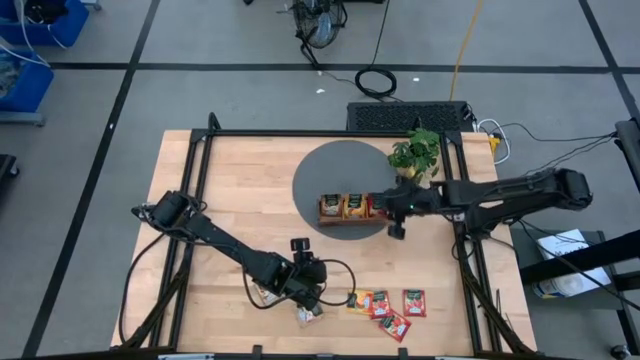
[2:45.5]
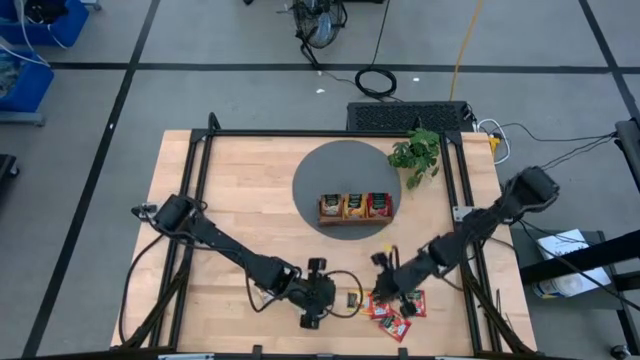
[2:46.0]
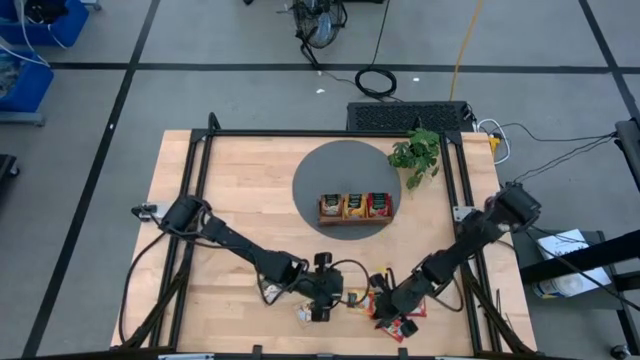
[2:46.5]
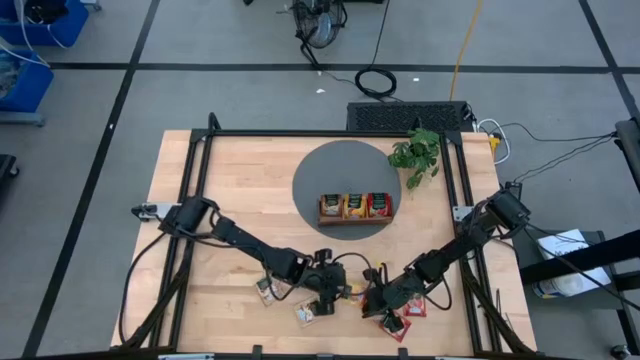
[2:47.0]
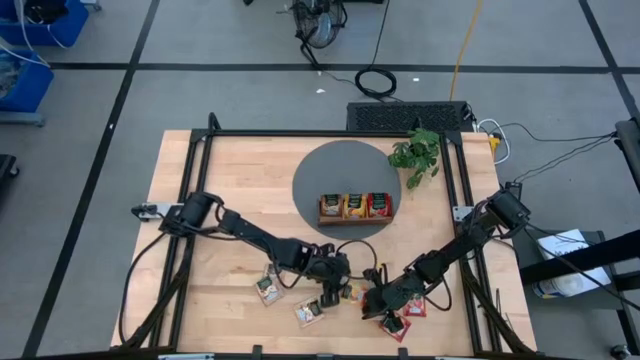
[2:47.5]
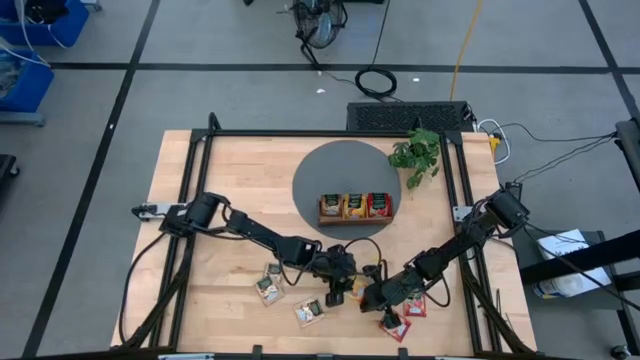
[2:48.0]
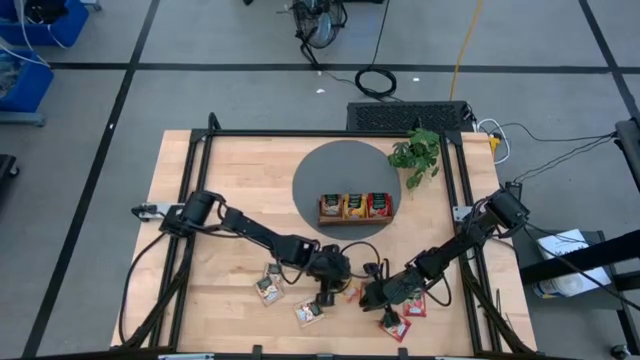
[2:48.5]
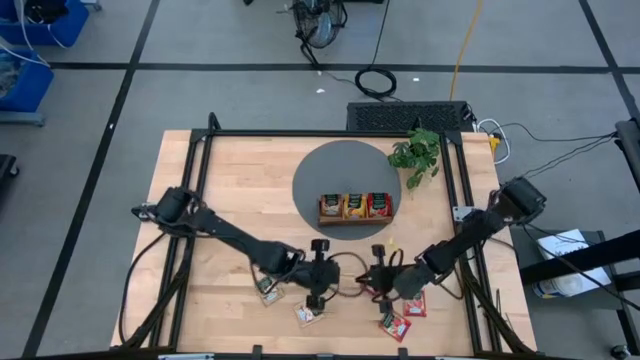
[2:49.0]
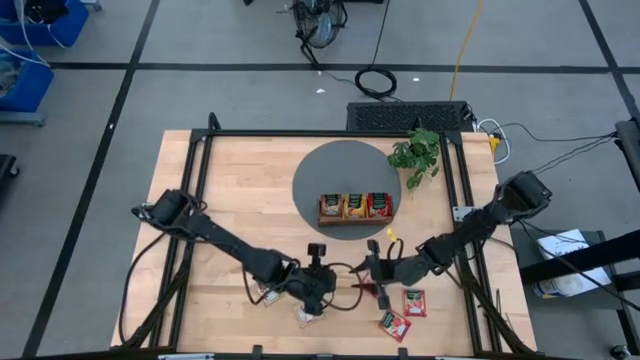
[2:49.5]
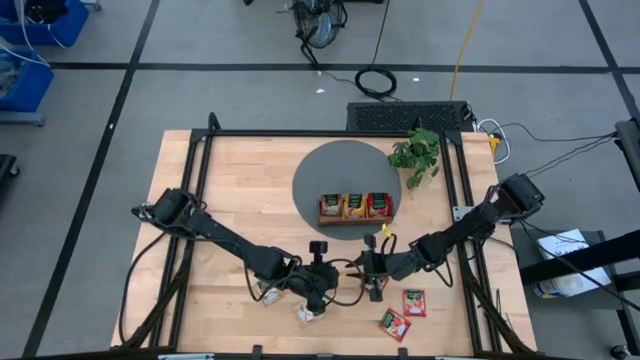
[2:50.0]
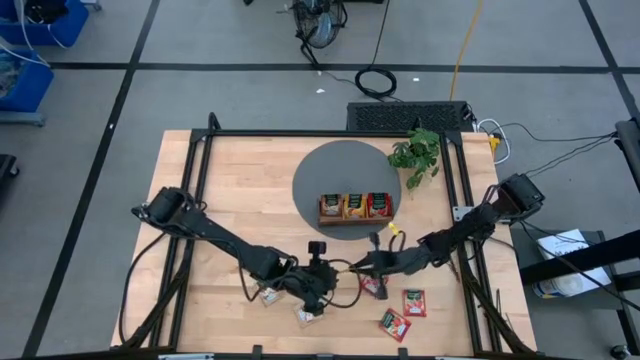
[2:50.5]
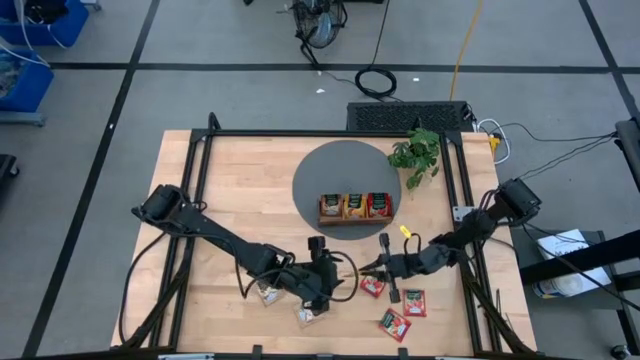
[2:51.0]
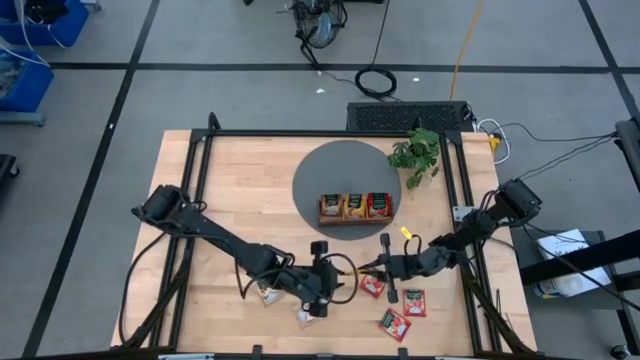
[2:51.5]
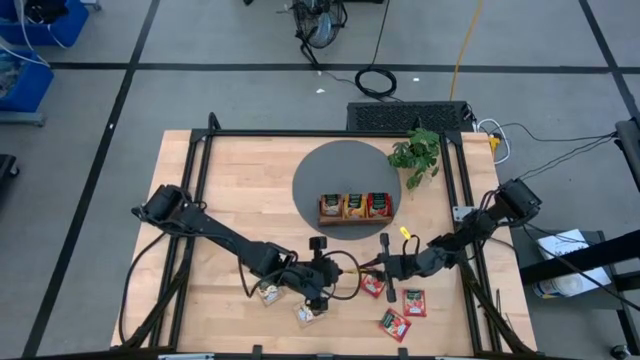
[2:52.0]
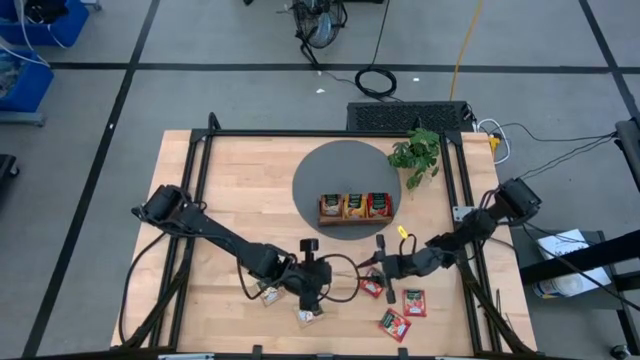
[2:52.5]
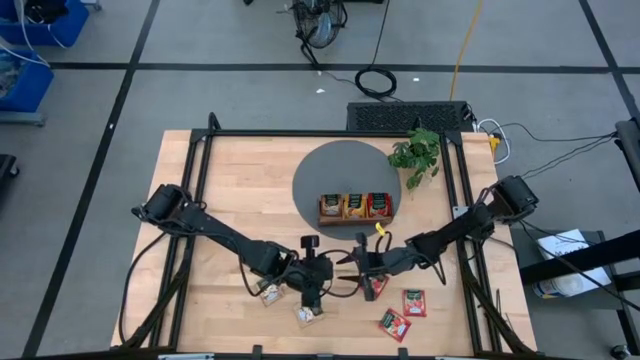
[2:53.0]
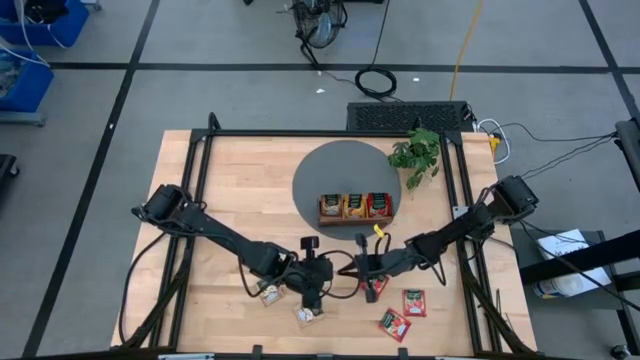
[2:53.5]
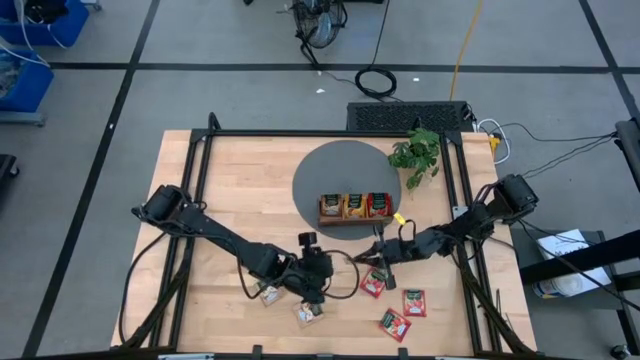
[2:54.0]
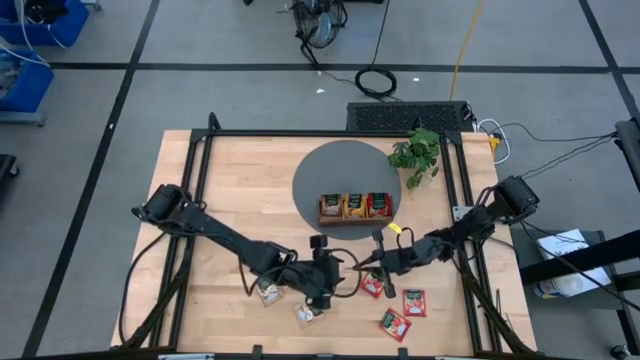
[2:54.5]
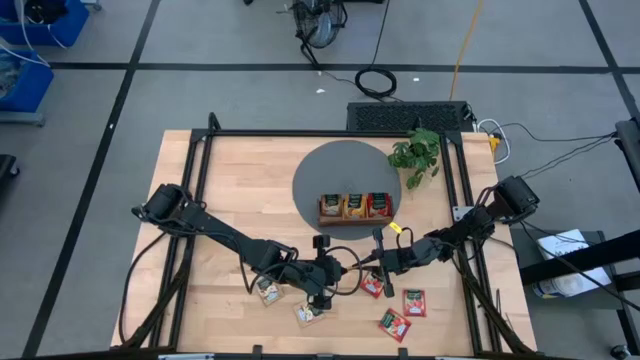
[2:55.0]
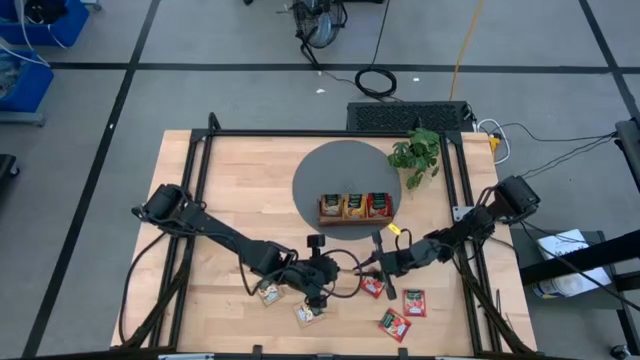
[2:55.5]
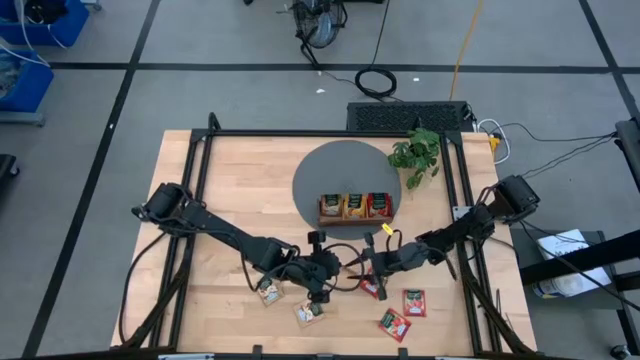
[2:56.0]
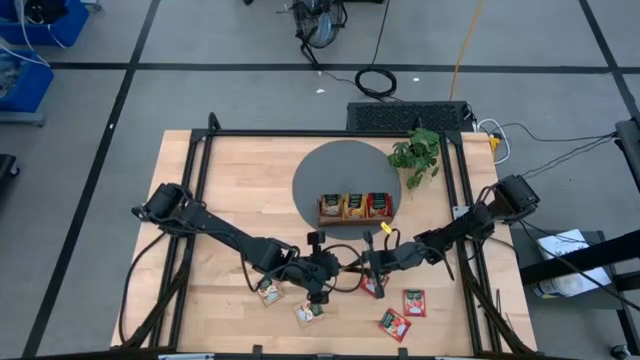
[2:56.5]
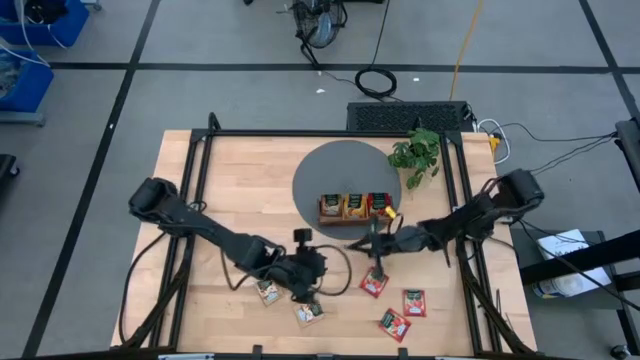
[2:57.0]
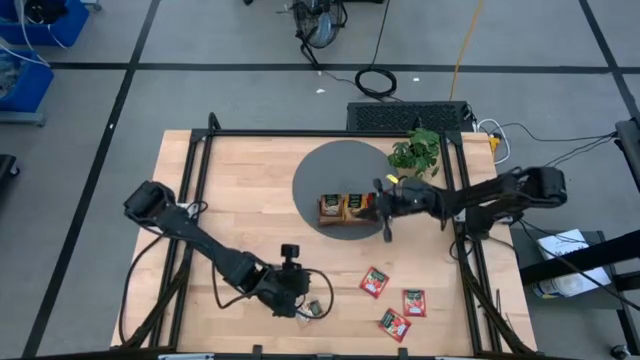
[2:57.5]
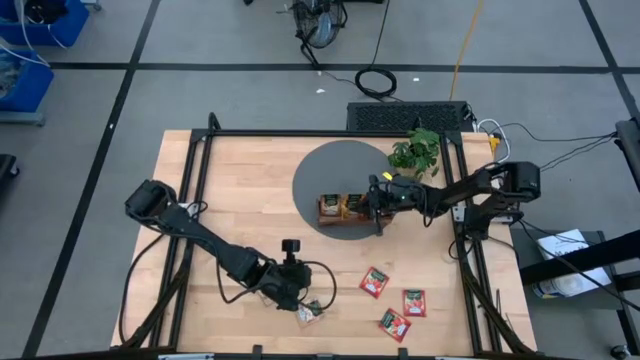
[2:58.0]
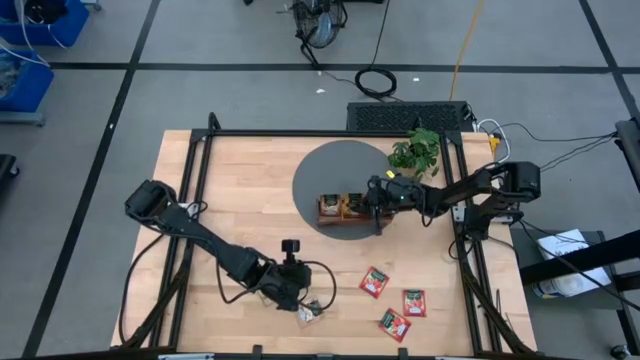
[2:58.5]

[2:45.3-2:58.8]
Task: Pick & Place Tea
Put the yellow tea bag into the middle section of the wooden organizer

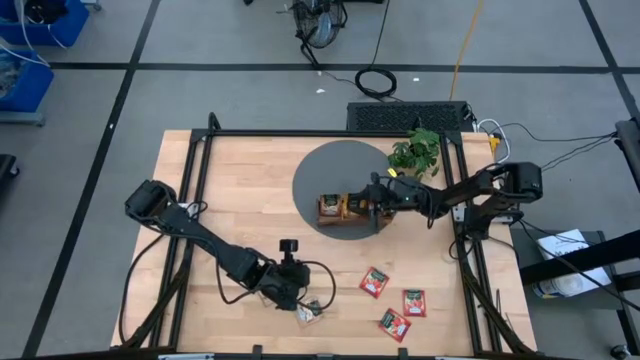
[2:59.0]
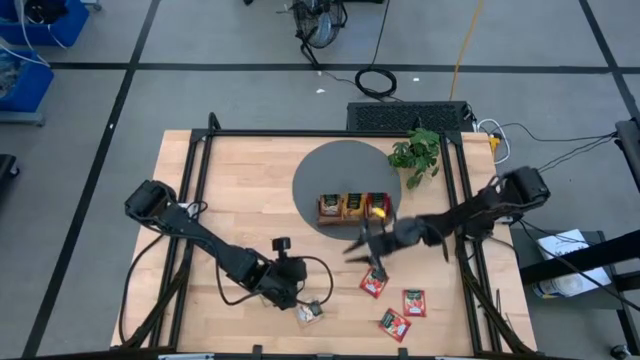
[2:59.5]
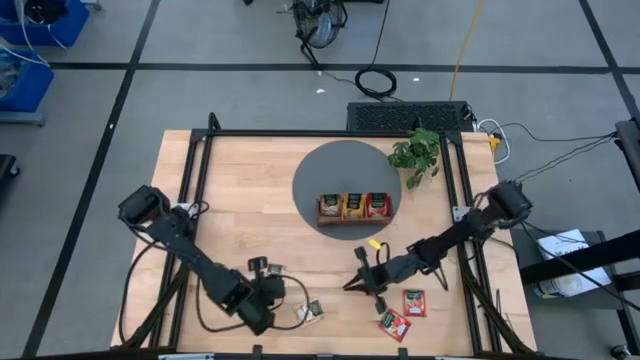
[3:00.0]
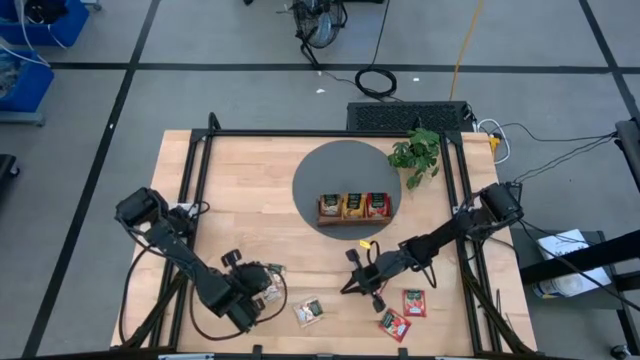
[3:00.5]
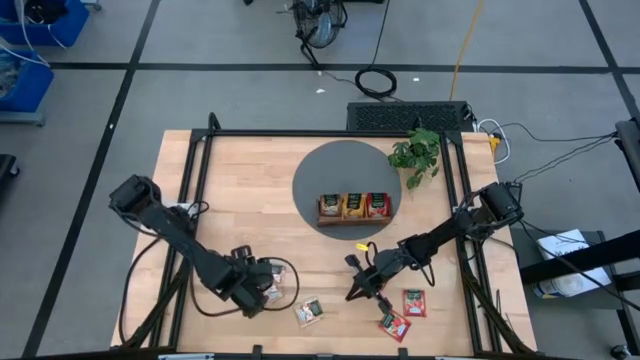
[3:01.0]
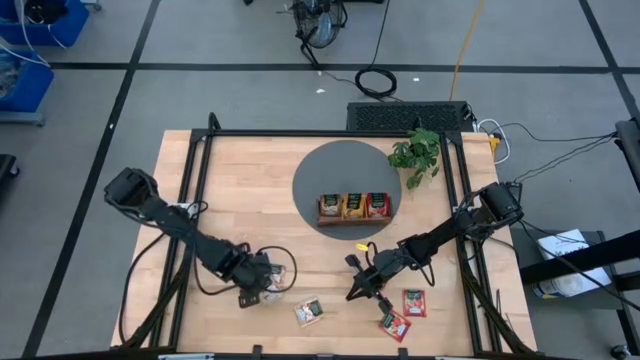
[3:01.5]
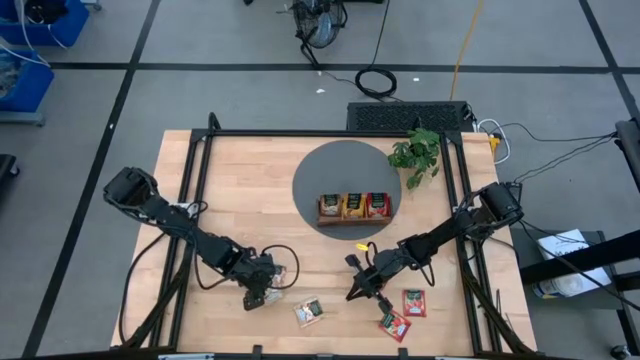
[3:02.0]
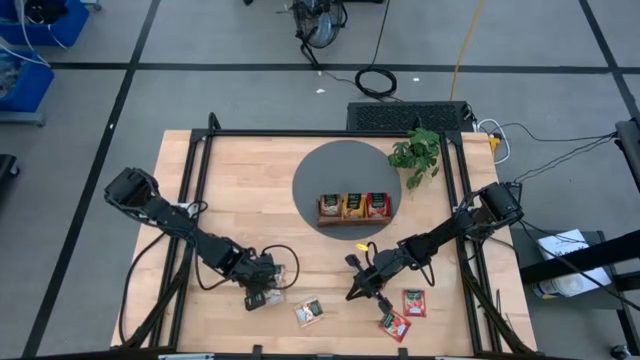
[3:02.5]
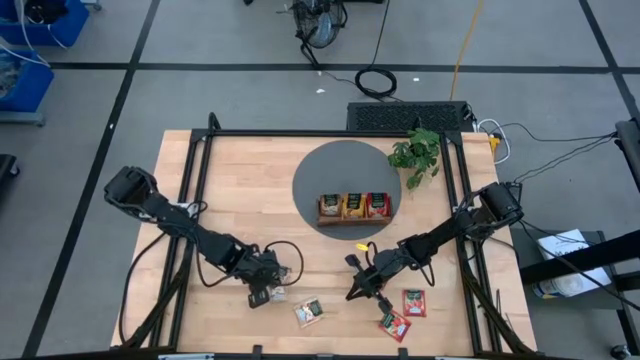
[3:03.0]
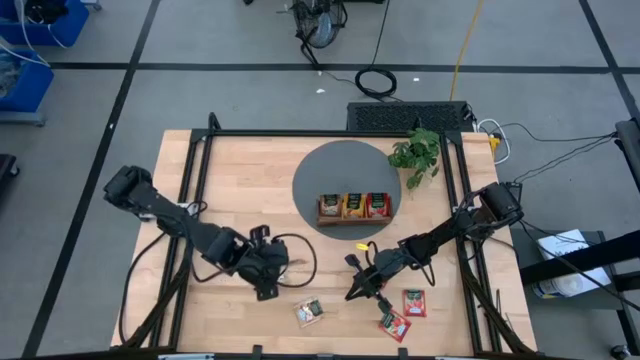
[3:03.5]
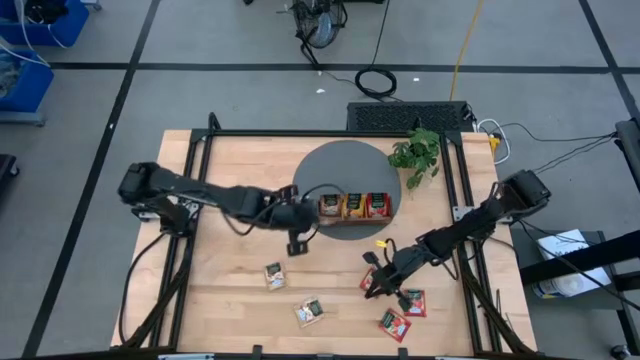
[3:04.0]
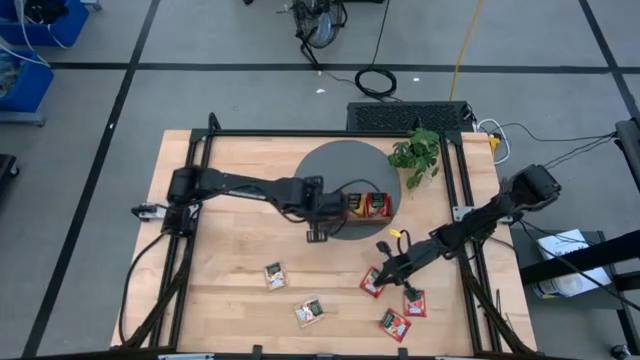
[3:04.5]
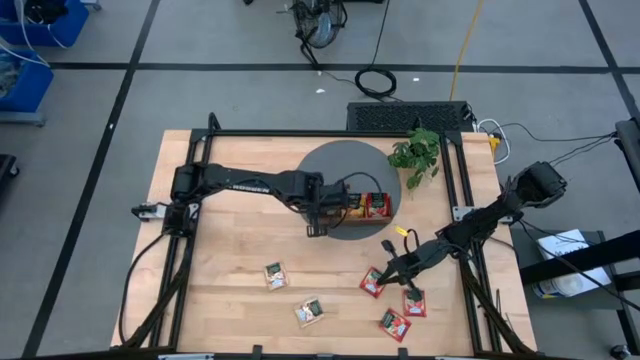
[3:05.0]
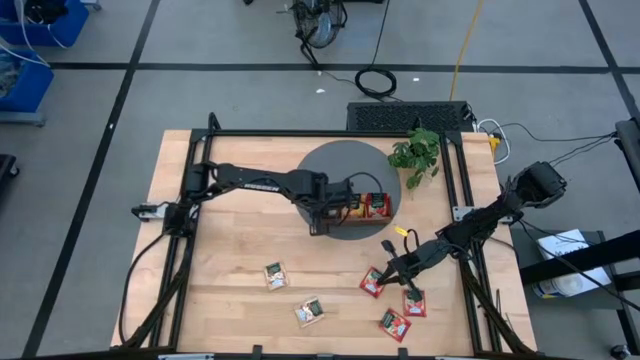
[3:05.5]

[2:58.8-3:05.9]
Put the brown tea bag into the left section of the wooden organizer
